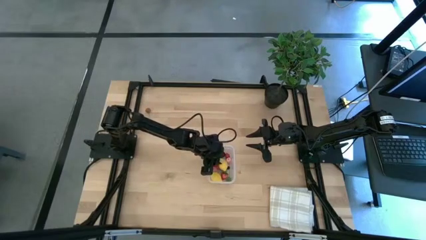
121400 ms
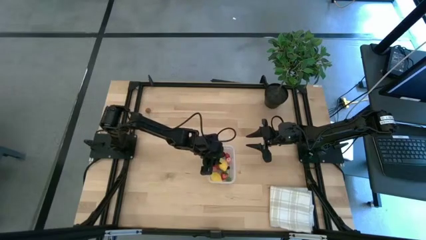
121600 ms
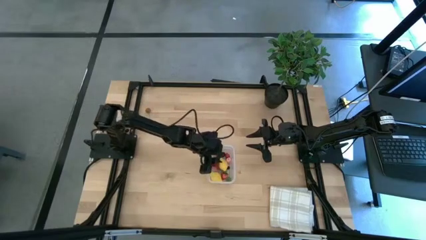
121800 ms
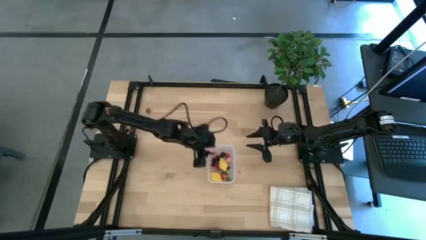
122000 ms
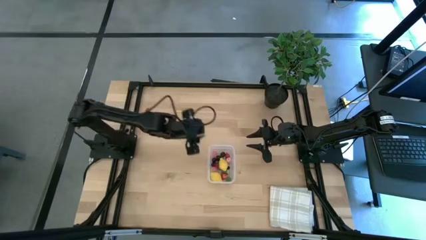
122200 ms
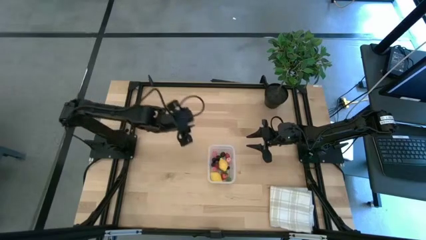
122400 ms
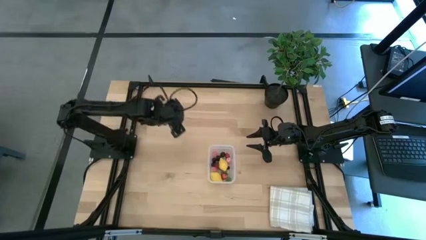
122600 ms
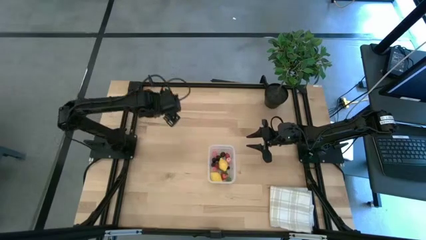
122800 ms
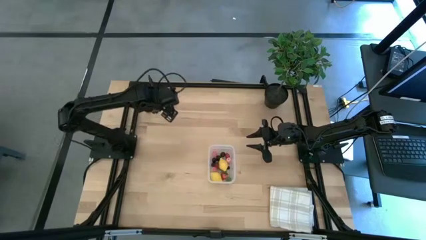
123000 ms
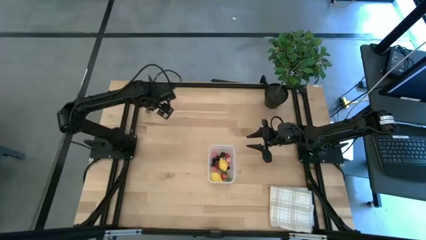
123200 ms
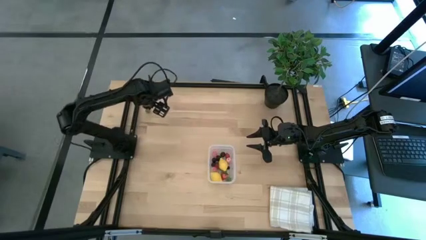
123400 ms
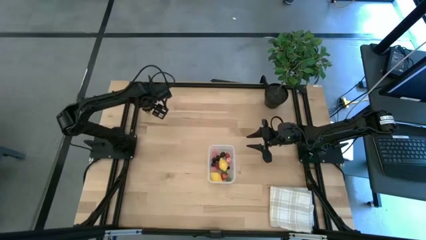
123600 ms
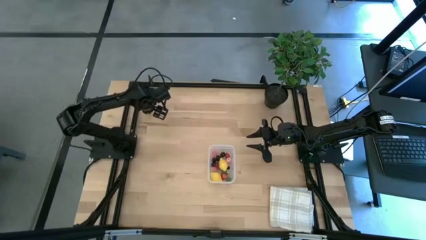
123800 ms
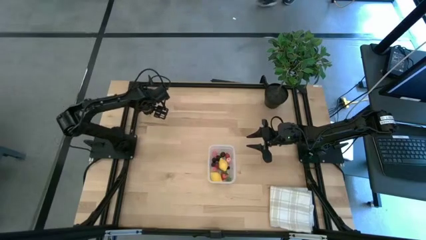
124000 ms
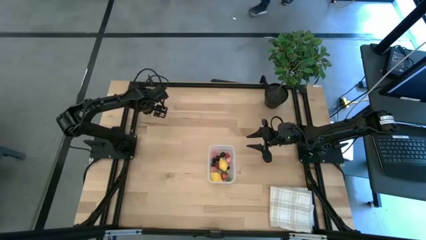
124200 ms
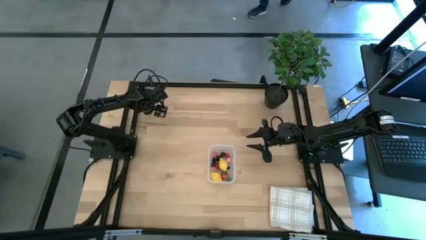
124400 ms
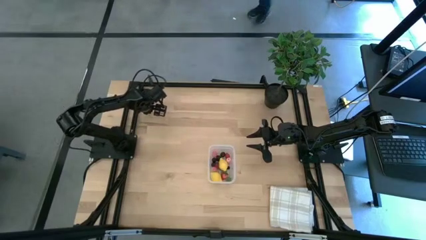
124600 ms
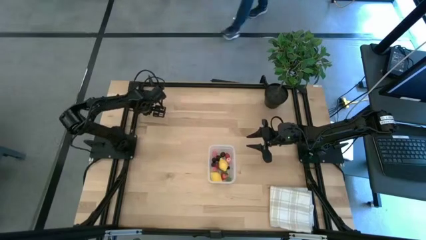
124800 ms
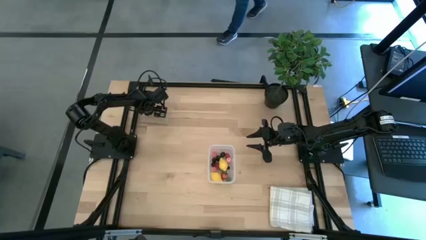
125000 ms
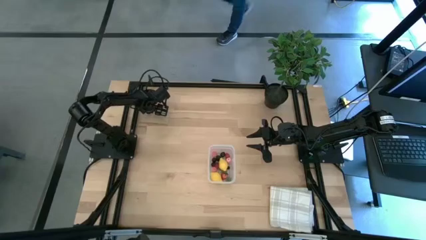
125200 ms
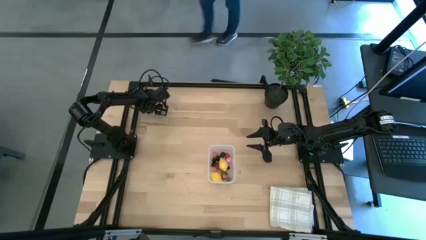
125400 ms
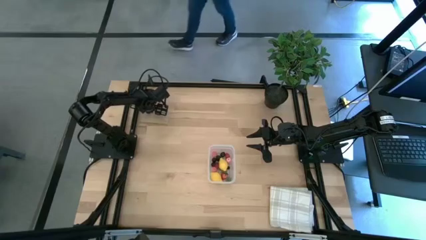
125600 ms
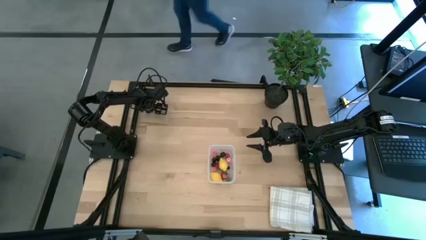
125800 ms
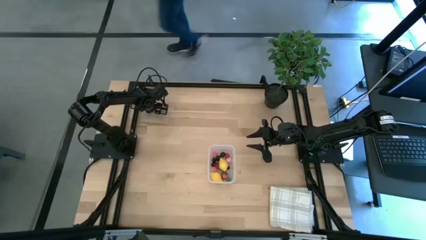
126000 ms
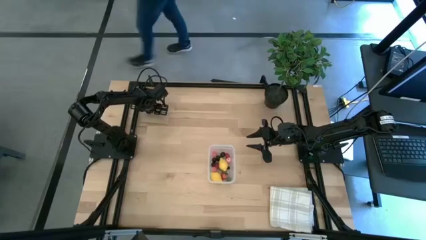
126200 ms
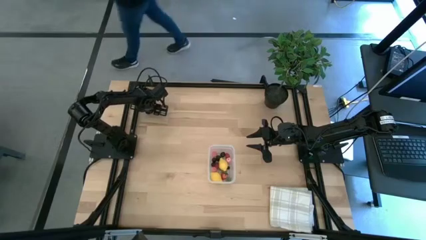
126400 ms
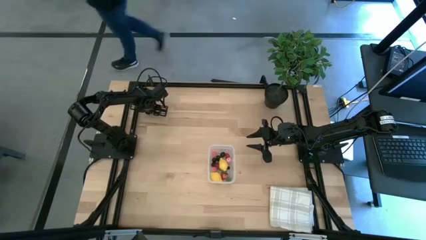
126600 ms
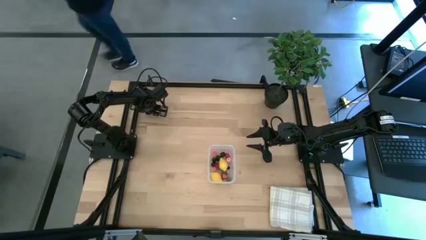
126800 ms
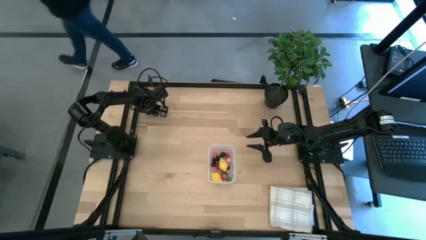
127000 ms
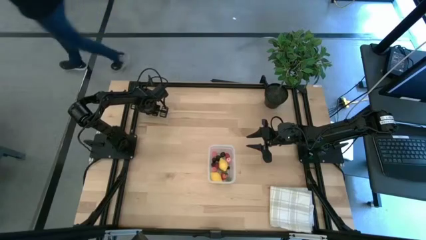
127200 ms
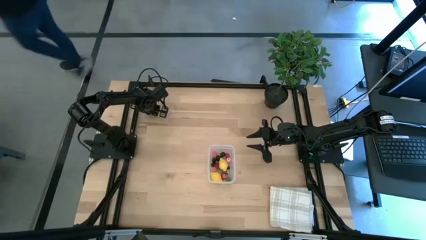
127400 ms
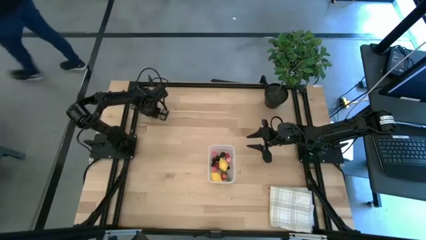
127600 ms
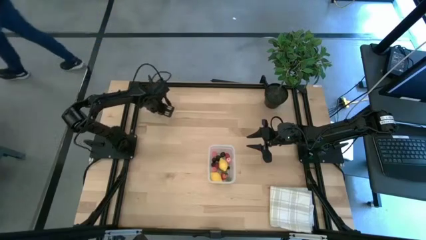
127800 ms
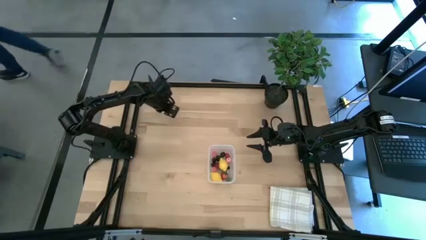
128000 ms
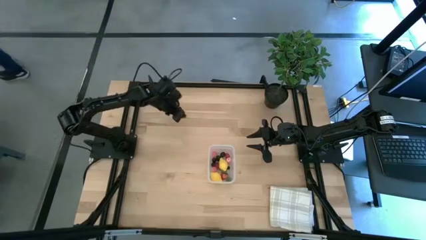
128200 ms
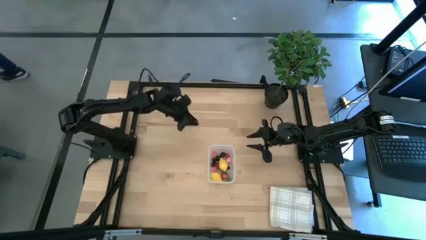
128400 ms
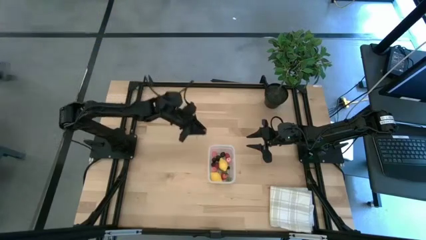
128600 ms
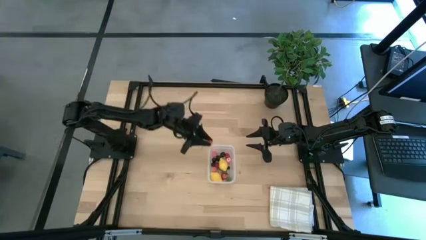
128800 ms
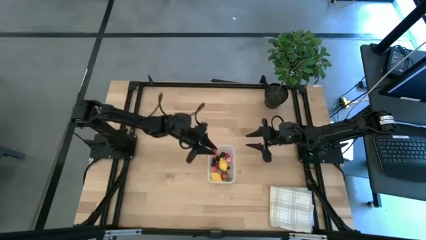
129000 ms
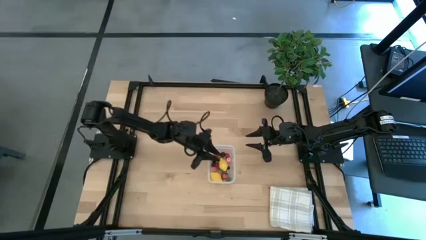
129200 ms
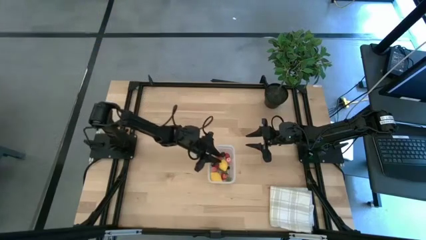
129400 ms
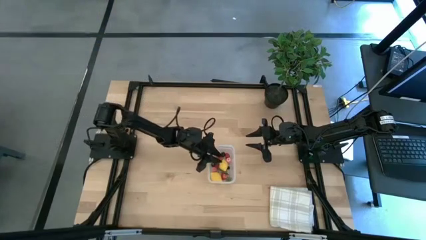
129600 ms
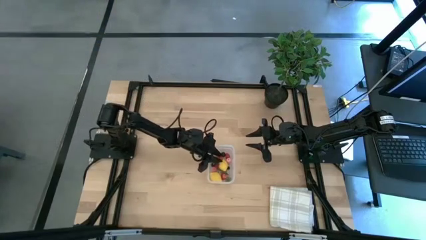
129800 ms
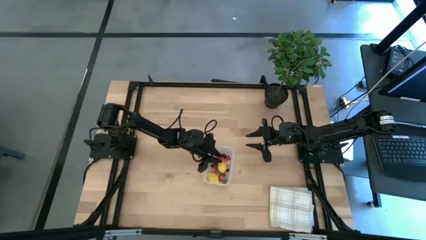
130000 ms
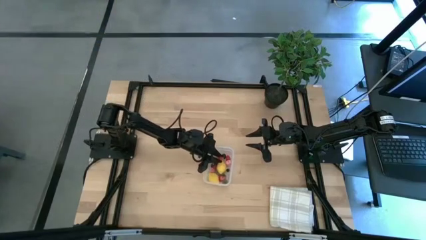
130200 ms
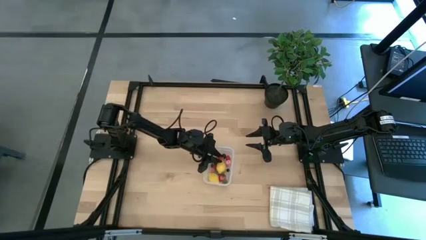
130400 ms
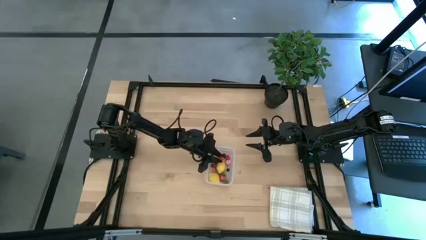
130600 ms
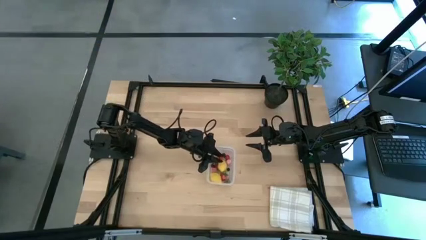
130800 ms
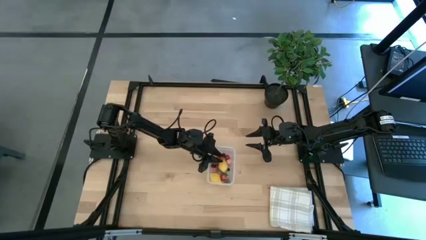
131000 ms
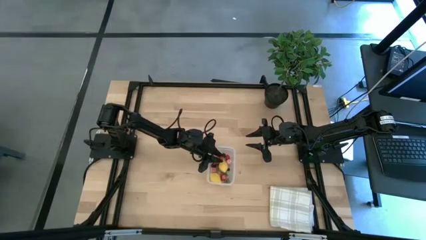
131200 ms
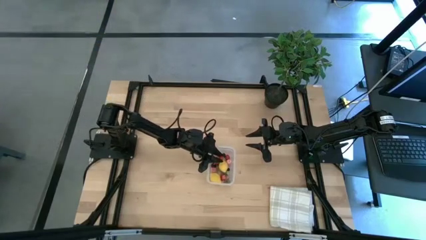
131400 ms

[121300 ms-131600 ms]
Task: Pick and placing Produce into tupperware
Put the strawberry into the transparent bin

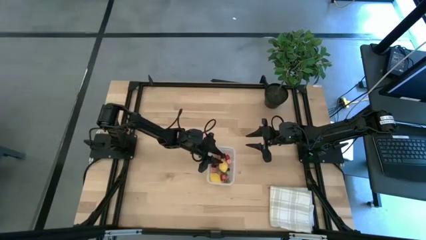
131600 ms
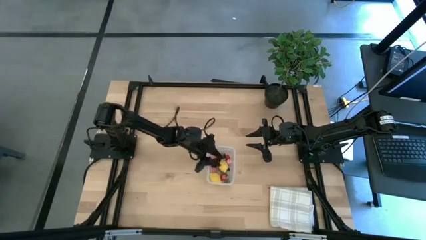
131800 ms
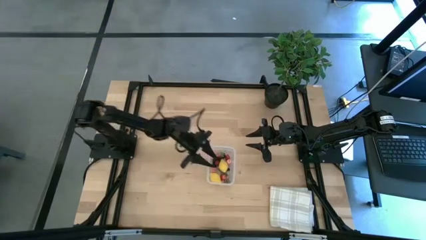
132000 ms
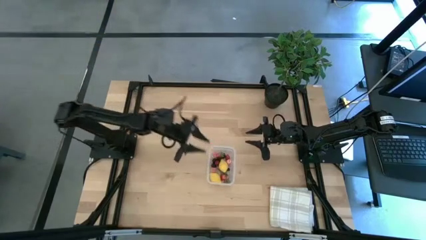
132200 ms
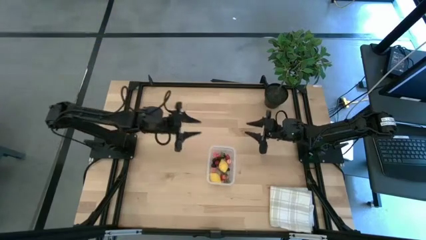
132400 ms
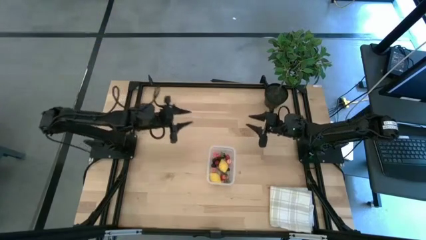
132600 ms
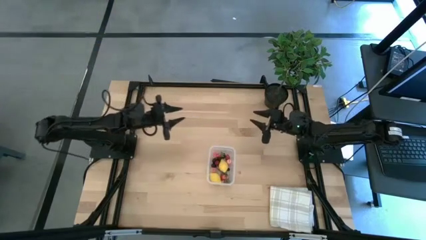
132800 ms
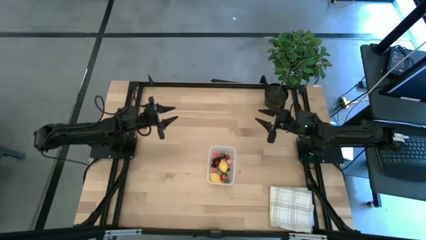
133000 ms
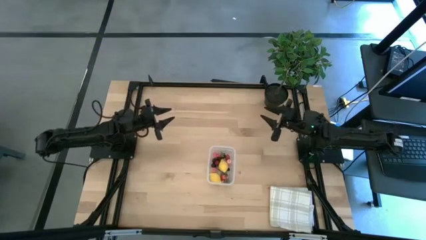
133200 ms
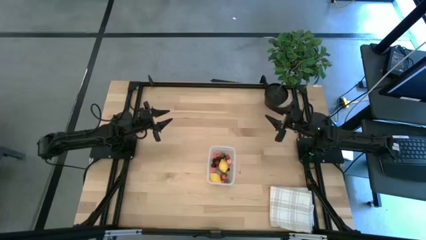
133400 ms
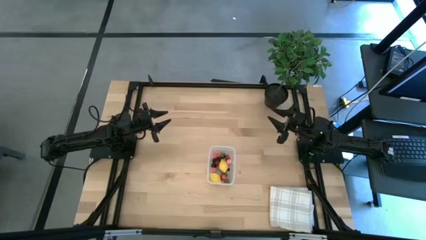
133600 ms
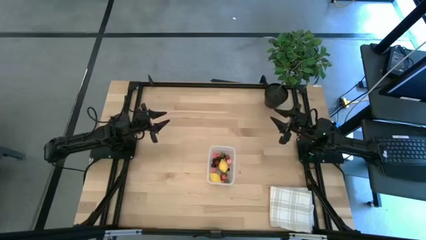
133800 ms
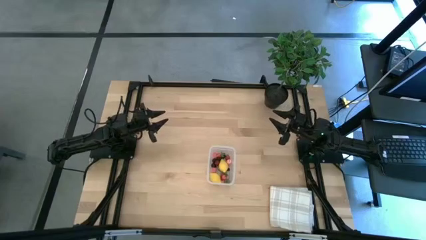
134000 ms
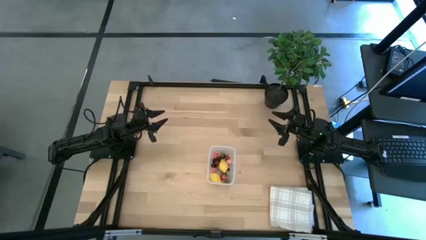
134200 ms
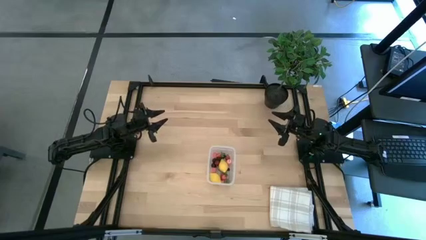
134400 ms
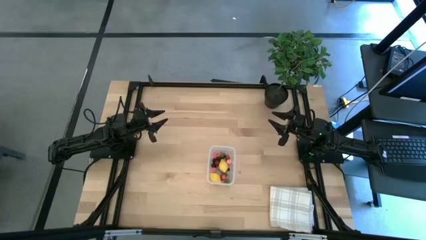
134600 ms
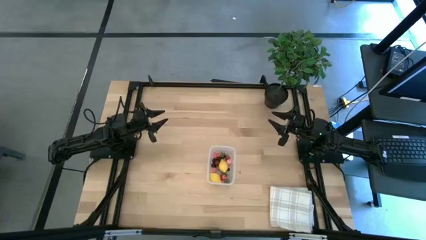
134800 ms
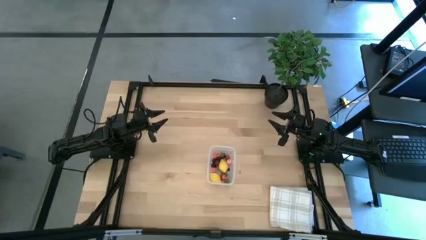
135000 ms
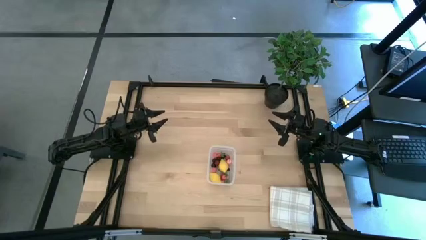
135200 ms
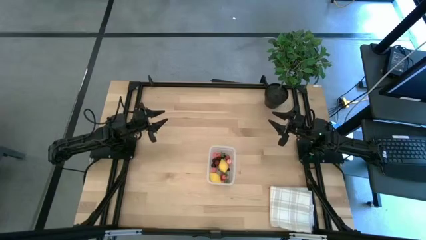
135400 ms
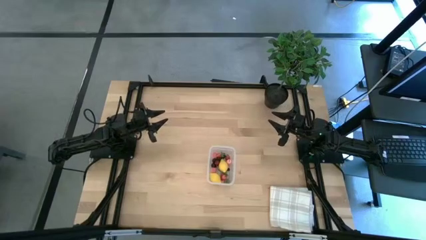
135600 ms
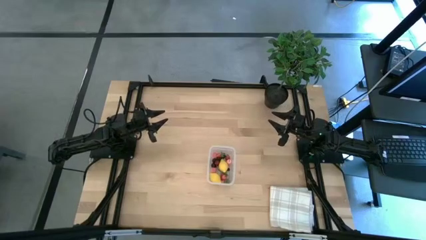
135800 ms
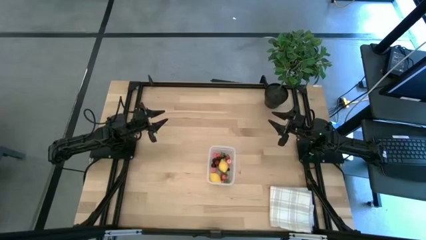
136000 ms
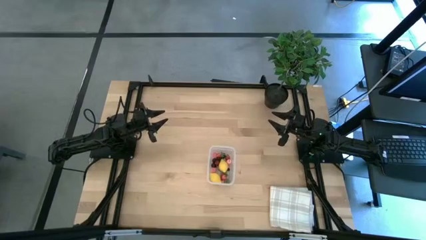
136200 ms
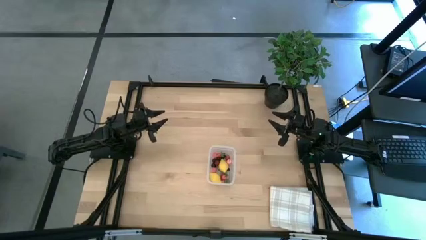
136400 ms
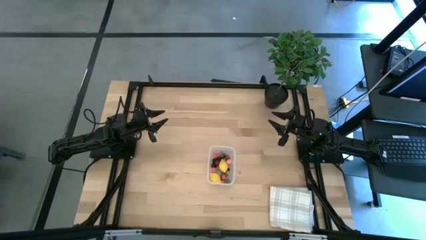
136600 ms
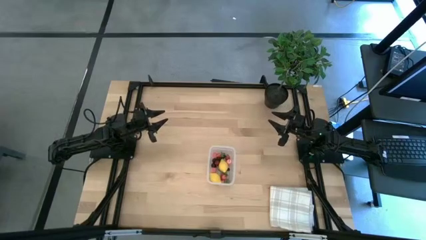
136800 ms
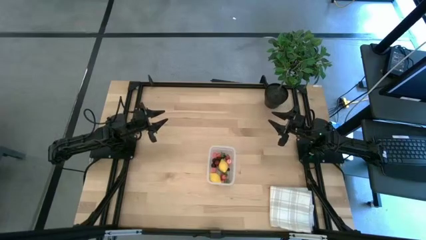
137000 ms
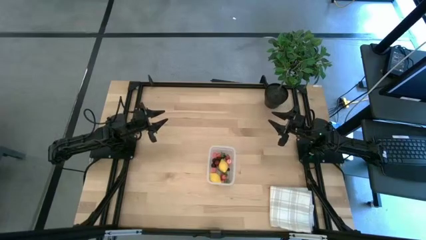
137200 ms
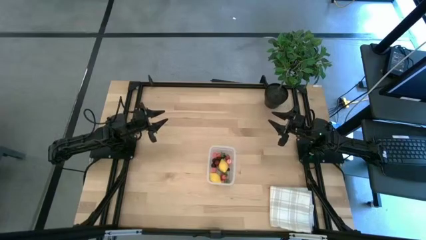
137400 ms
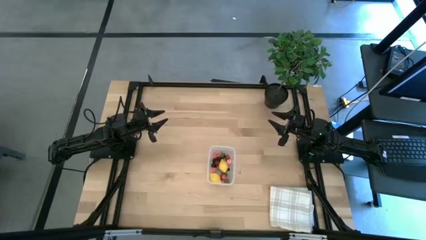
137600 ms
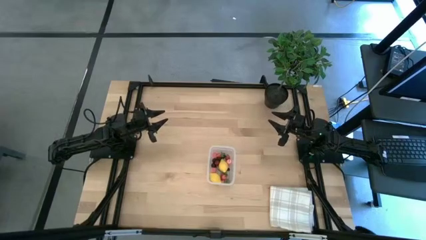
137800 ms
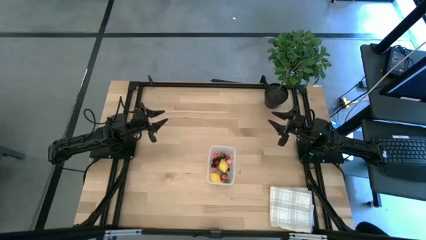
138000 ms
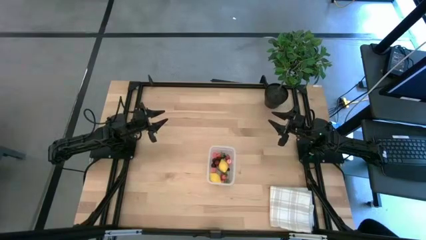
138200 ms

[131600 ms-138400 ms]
Return to Home Position
